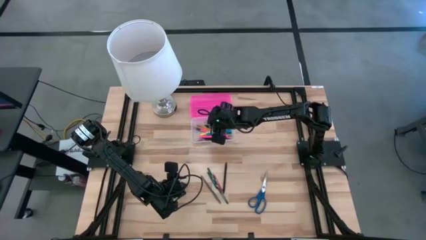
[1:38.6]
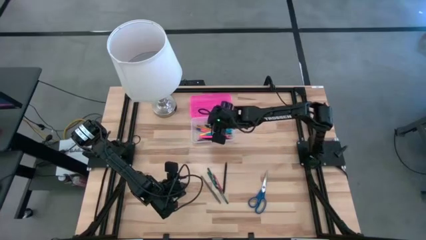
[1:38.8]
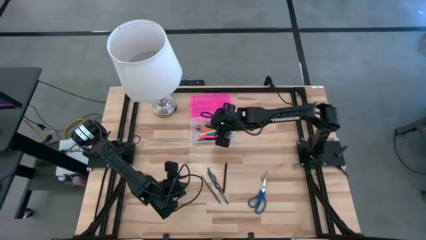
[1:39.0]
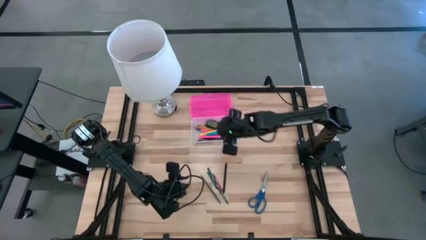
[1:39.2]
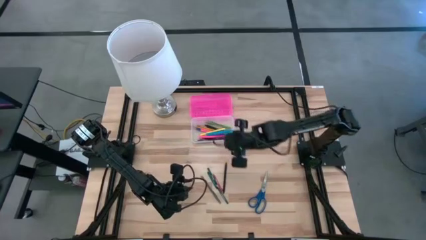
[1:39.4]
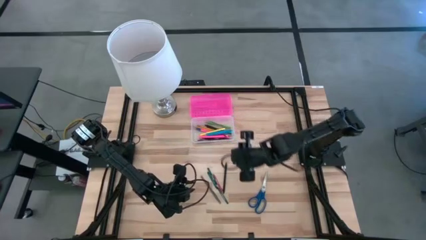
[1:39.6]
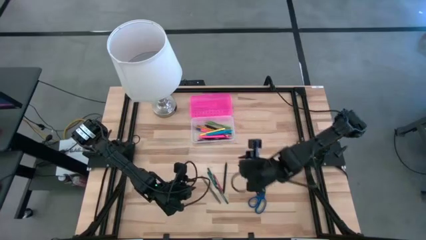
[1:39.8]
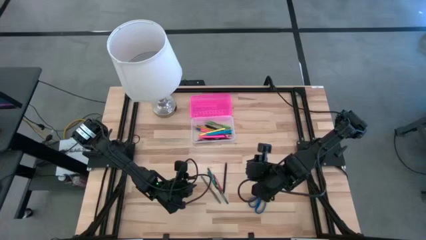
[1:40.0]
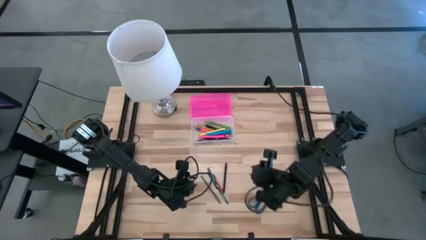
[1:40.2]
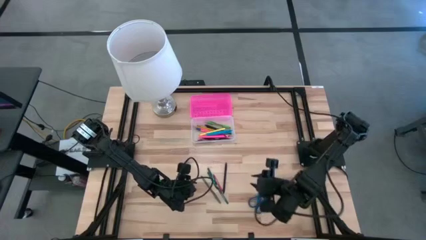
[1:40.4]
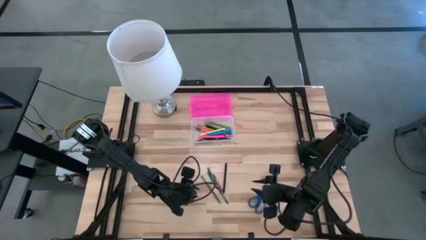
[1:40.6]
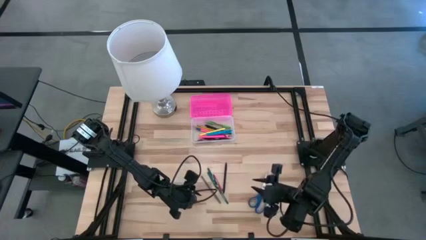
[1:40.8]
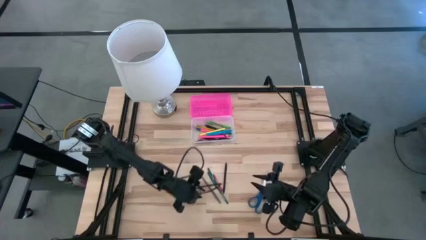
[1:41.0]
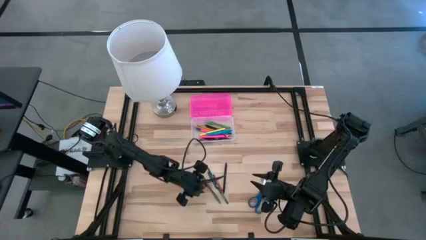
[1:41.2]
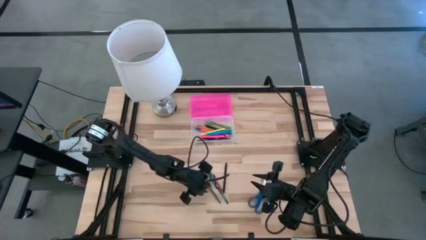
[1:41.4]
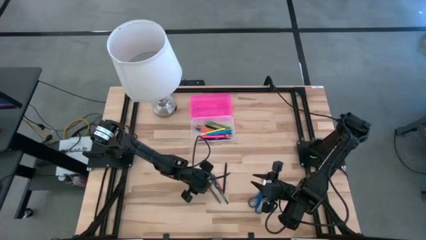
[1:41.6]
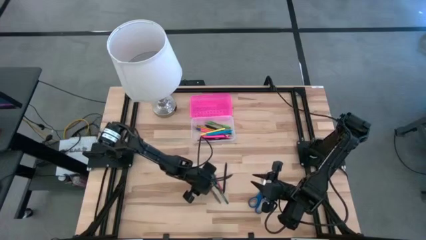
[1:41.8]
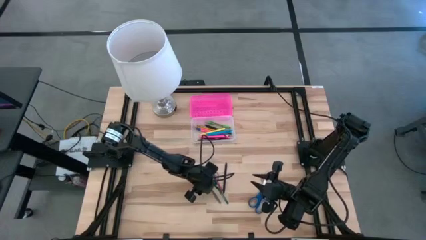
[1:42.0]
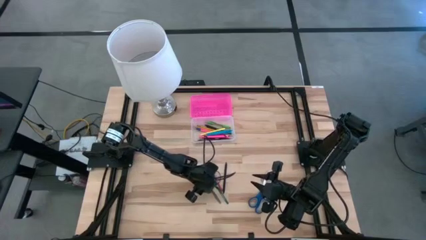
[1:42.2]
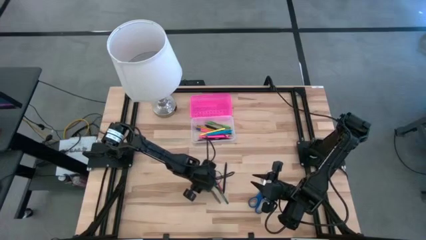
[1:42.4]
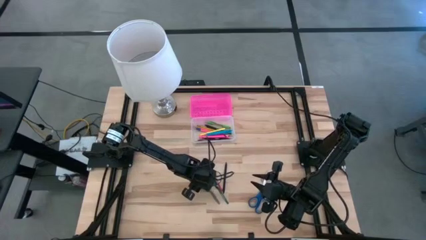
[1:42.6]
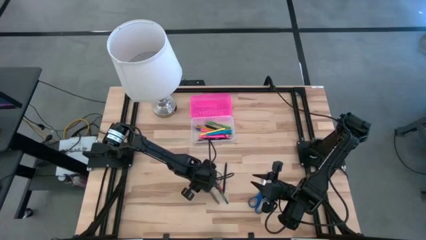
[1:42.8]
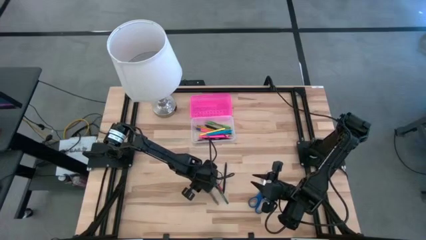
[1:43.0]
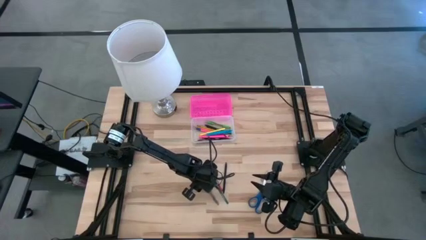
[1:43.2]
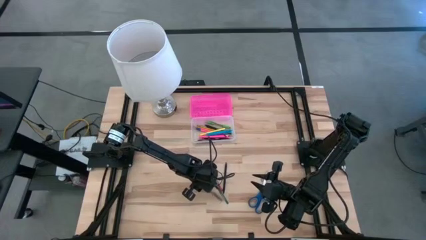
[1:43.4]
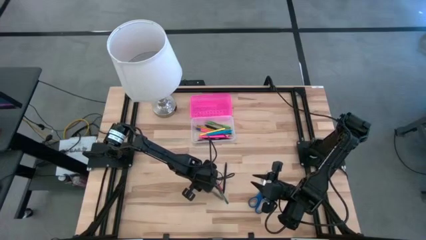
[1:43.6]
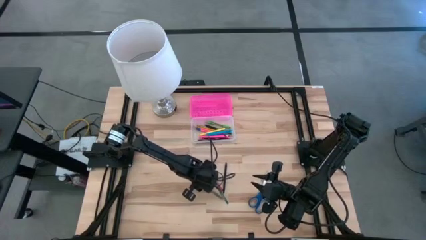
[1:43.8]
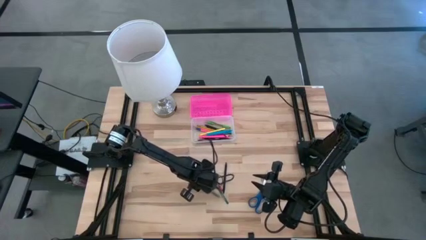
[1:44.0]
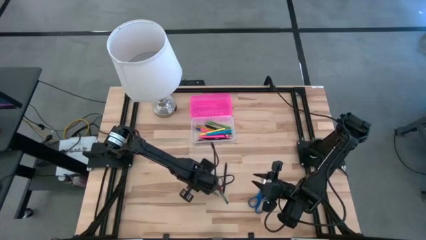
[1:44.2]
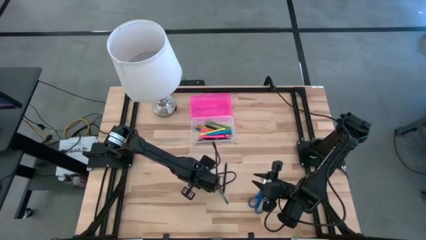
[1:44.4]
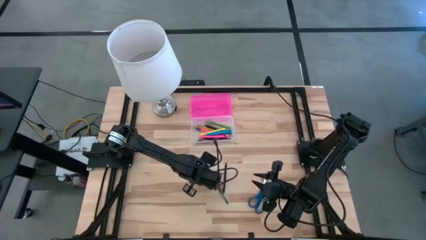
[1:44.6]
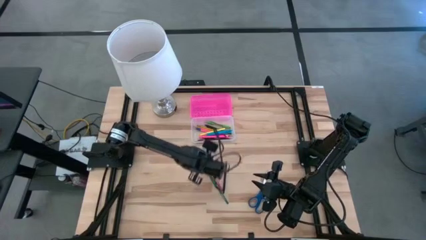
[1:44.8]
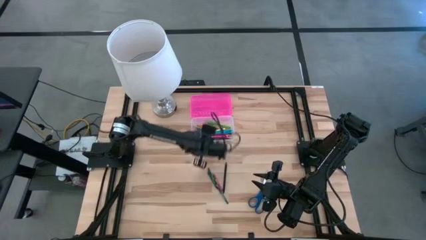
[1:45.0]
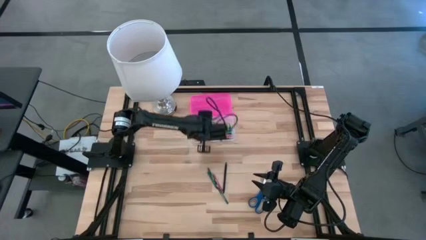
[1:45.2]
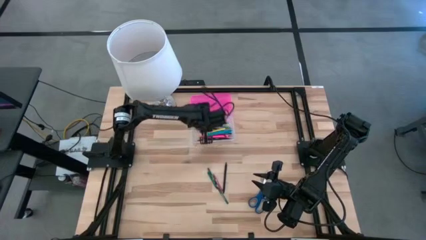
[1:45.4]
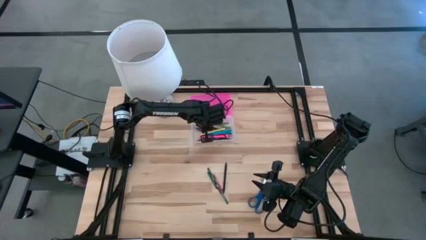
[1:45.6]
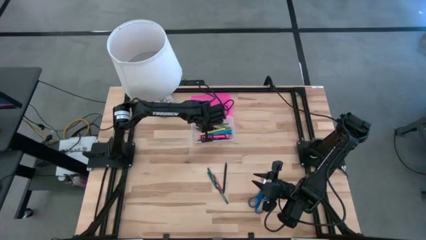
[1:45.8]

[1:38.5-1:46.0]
Task: Pick & place school supplies into a supply box
Put the gray pen into the pink supply box

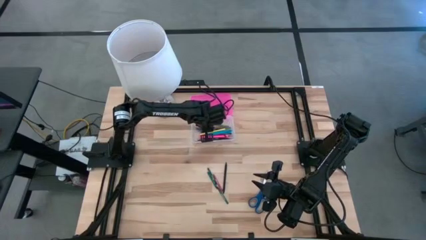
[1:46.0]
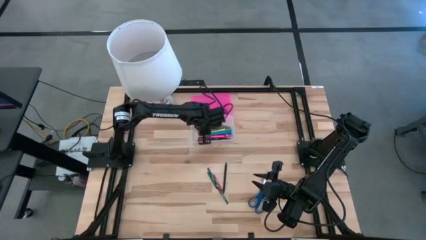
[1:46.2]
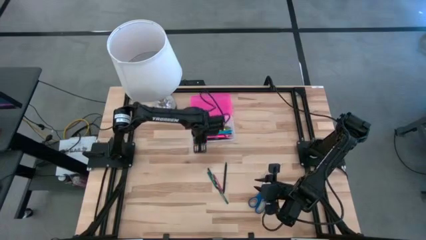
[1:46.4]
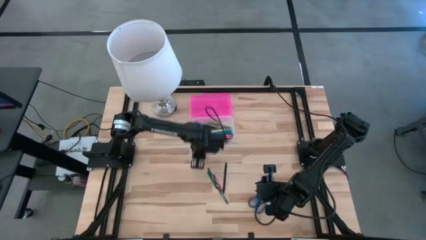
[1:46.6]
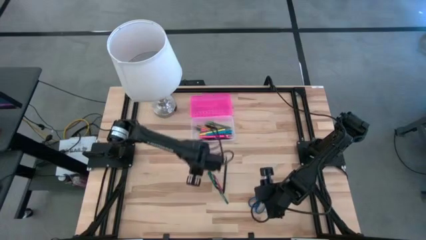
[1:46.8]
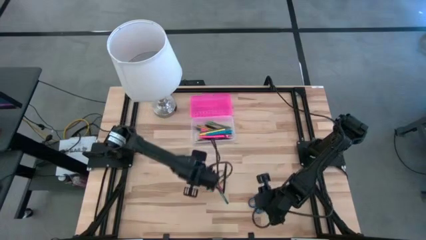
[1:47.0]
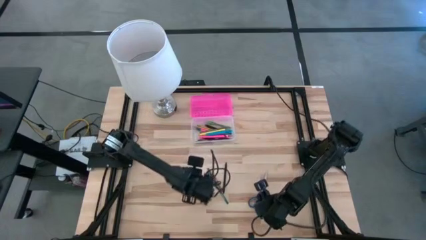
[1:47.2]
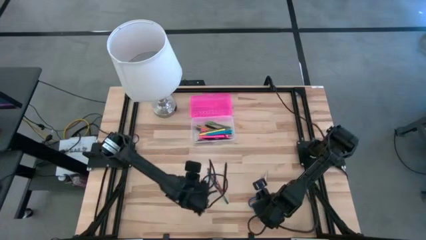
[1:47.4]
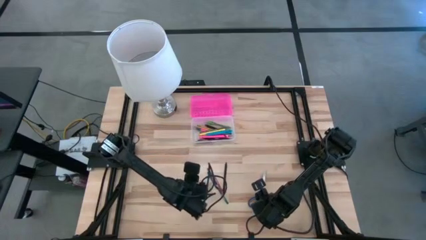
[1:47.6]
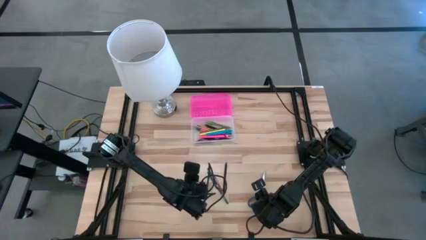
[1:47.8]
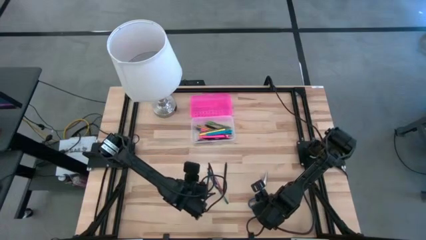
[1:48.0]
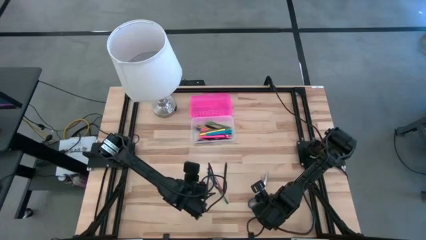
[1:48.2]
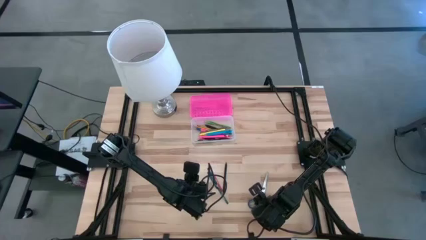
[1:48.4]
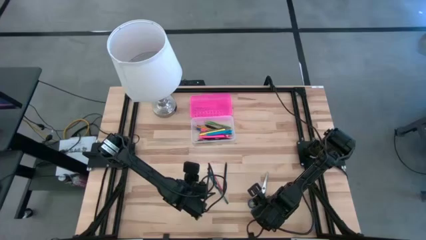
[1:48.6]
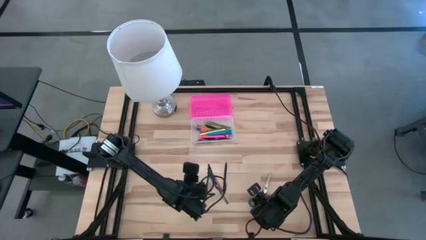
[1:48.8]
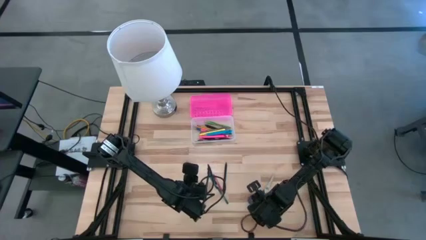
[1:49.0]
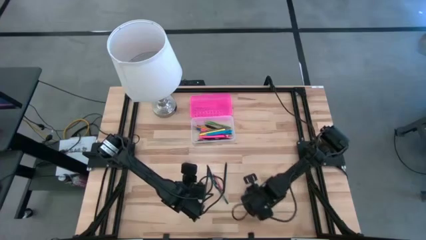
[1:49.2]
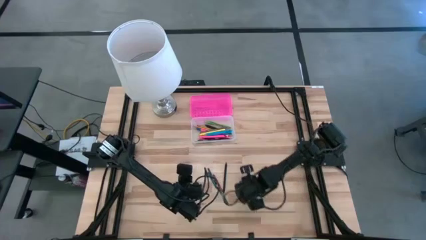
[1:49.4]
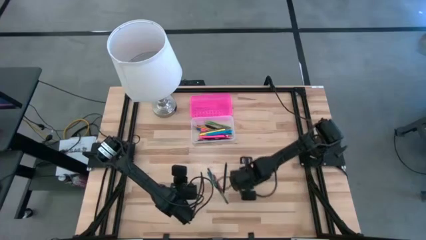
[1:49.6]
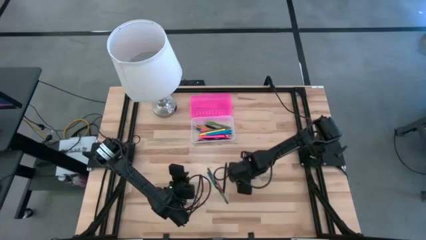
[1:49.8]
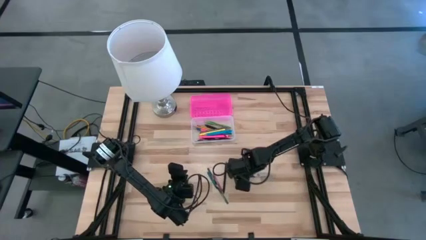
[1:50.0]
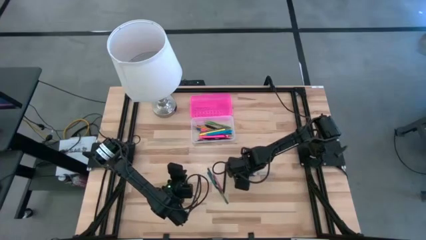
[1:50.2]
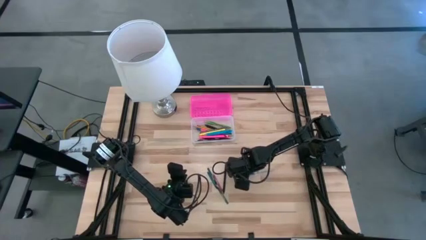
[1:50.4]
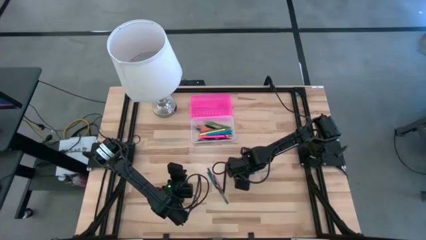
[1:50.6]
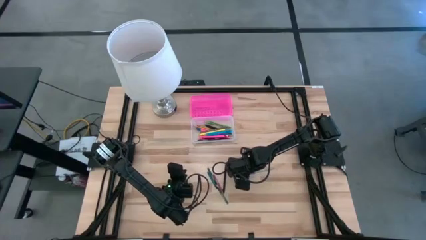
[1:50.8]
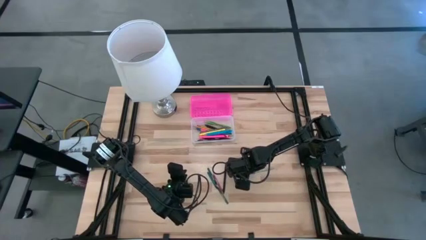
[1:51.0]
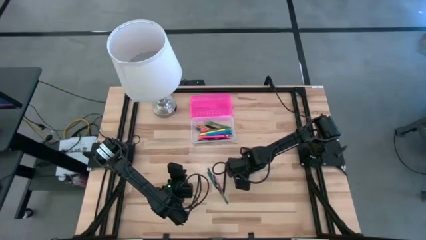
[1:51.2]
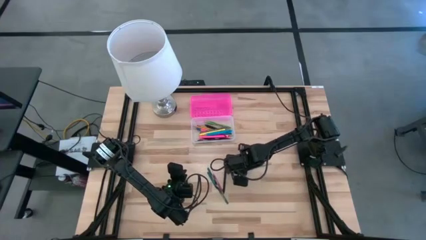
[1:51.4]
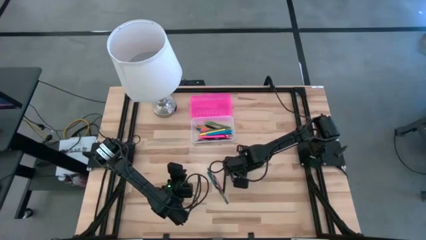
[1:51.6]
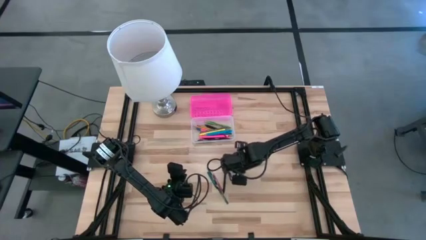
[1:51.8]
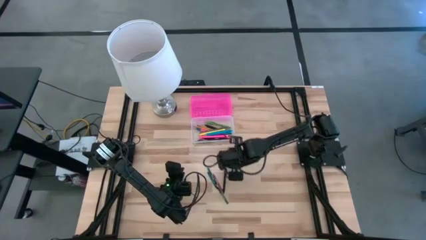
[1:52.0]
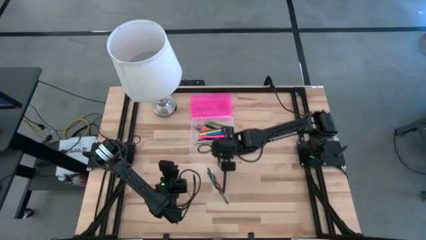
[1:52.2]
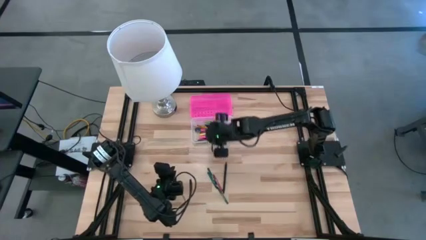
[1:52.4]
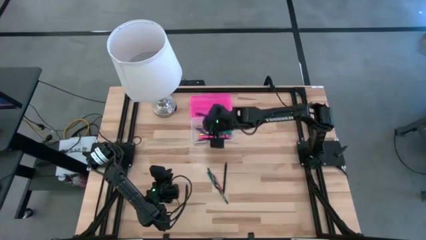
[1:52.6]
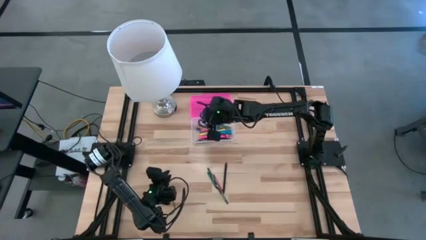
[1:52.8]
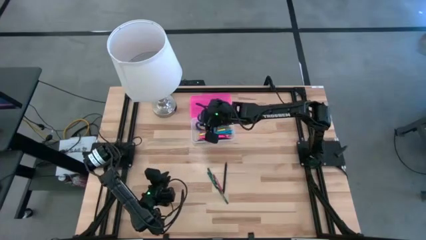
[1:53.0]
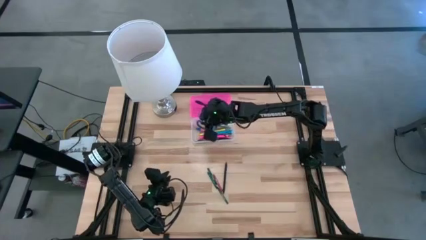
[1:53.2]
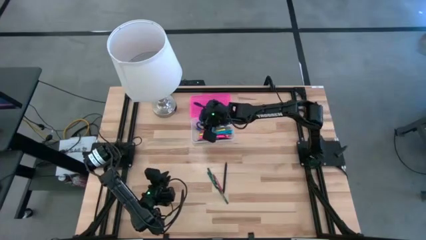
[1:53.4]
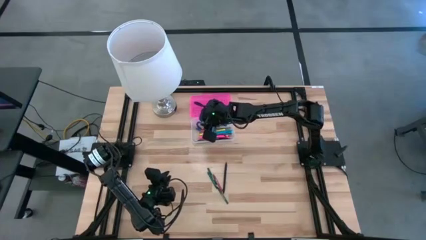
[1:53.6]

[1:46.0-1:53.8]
Put the blue scissors into the pink supply box

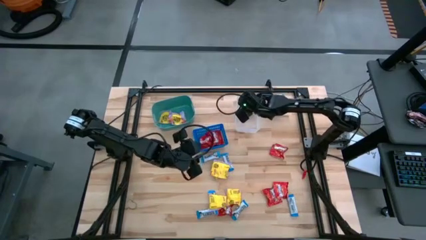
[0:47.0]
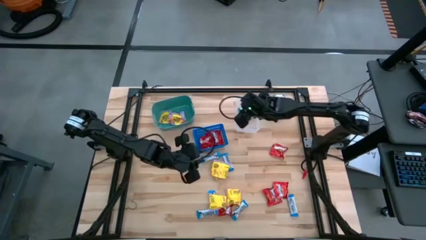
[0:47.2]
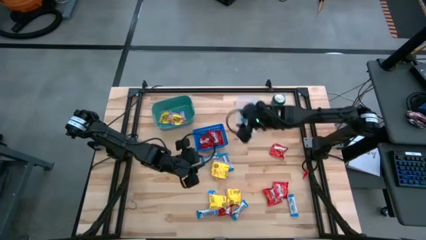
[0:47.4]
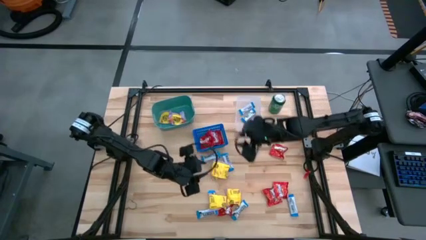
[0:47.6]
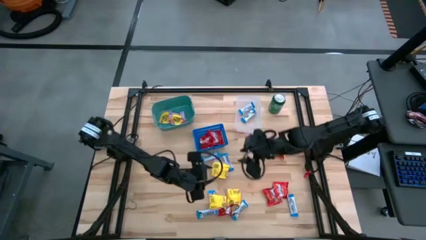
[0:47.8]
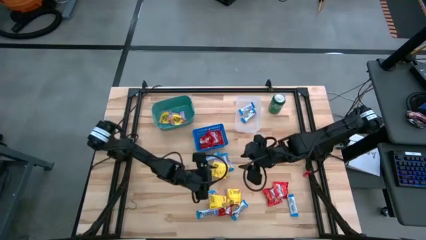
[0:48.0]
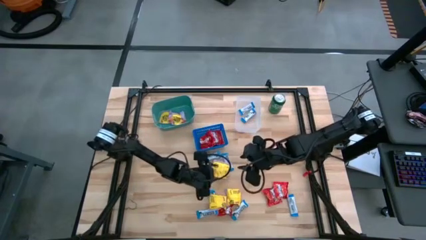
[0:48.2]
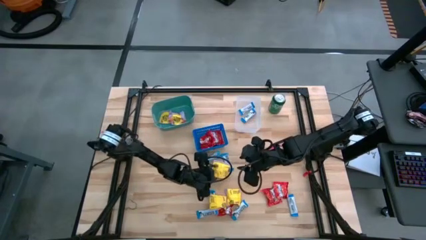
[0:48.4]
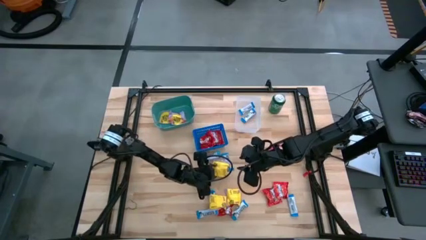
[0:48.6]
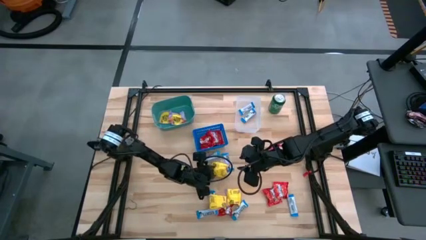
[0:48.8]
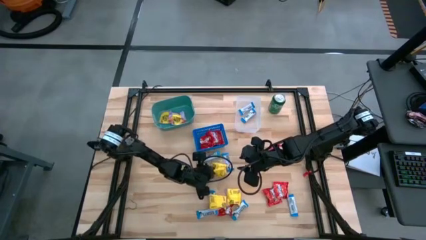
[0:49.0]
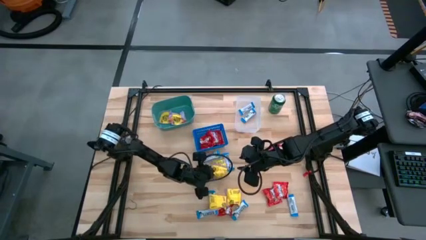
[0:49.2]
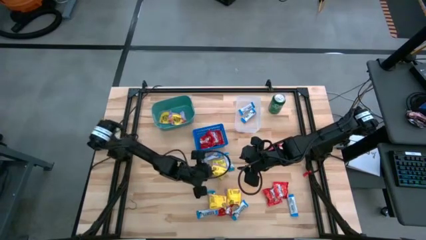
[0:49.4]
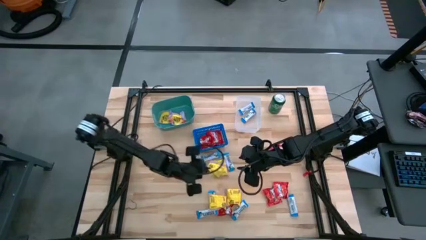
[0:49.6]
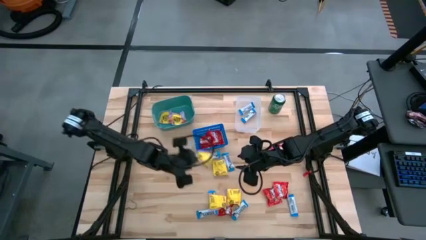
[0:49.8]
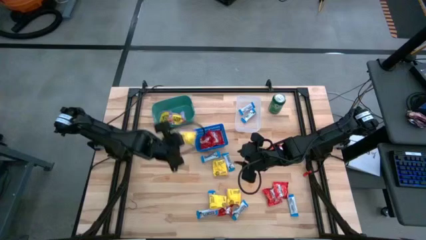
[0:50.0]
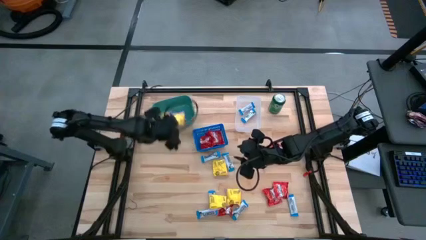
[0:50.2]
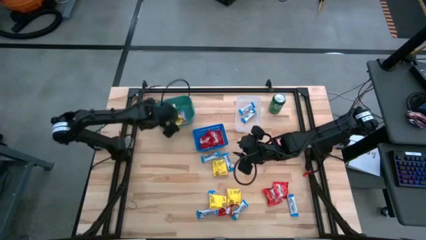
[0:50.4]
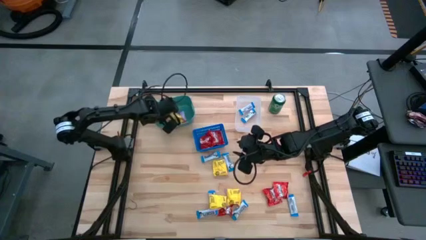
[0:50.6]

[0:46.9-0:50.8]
Task: Sort candy
Put the sour patch candy into the blue green bin
